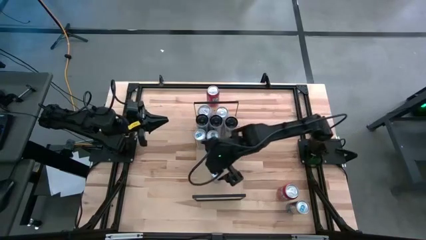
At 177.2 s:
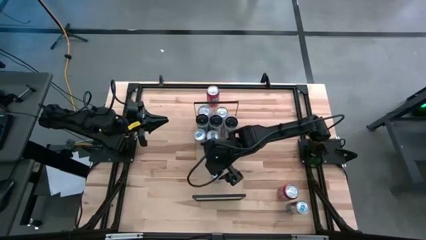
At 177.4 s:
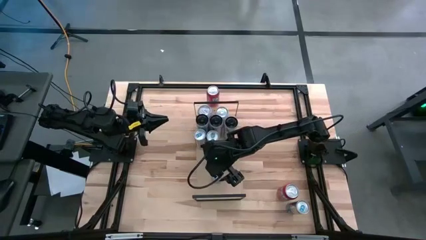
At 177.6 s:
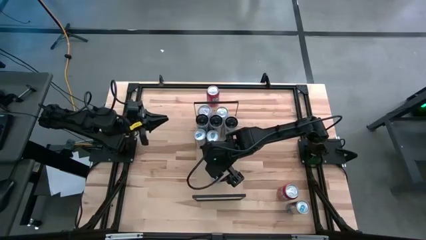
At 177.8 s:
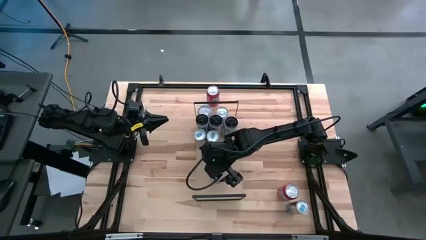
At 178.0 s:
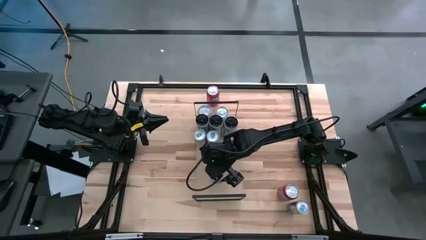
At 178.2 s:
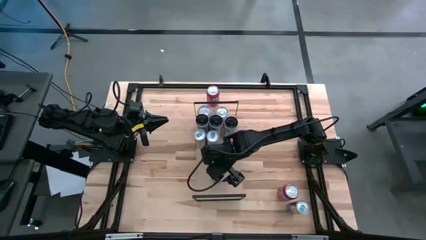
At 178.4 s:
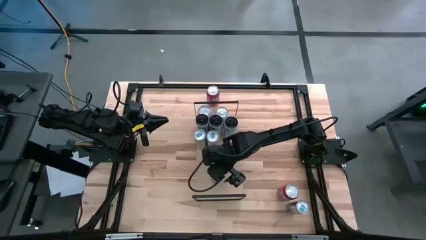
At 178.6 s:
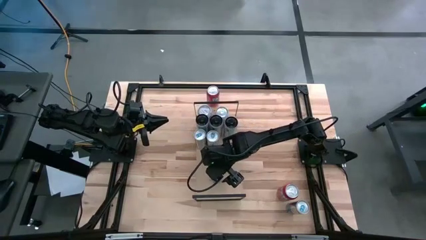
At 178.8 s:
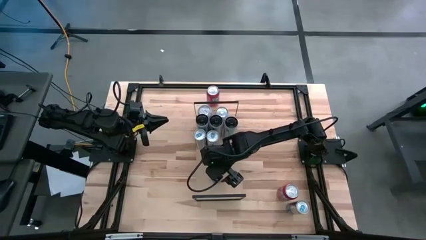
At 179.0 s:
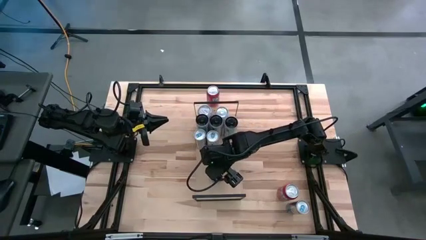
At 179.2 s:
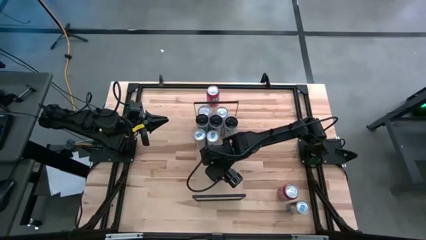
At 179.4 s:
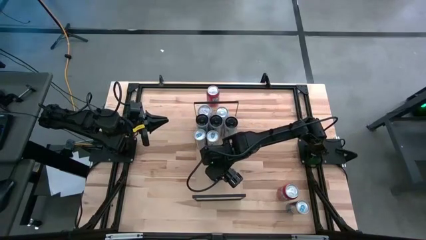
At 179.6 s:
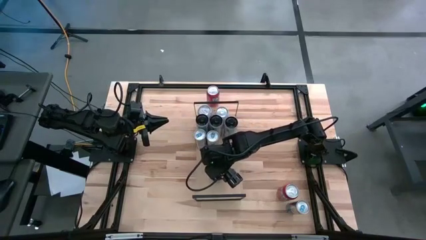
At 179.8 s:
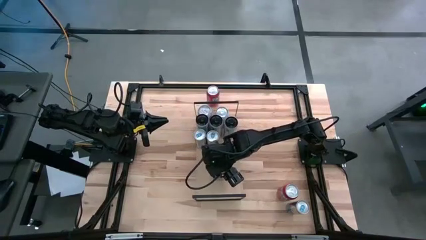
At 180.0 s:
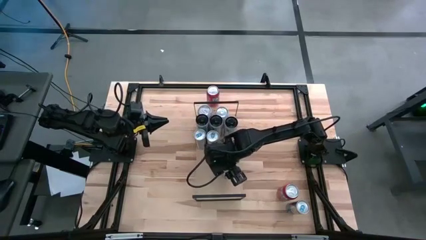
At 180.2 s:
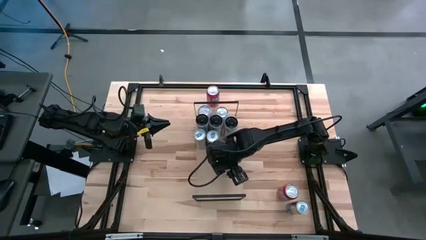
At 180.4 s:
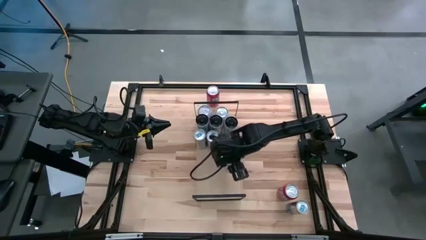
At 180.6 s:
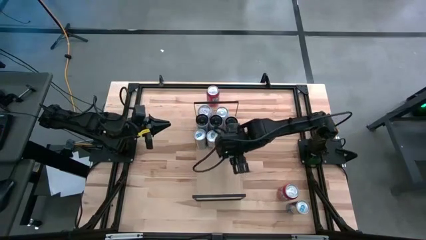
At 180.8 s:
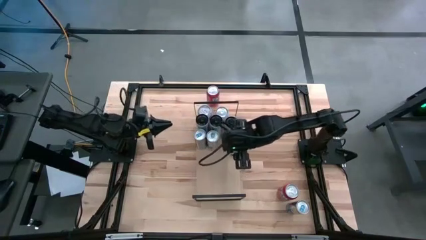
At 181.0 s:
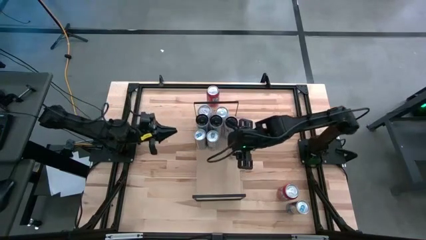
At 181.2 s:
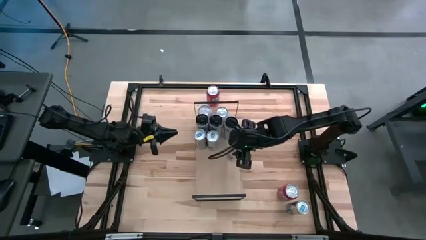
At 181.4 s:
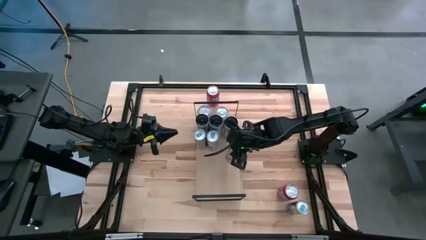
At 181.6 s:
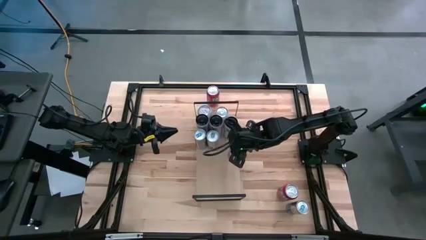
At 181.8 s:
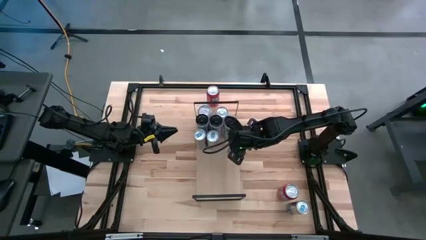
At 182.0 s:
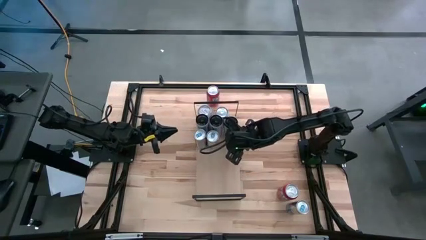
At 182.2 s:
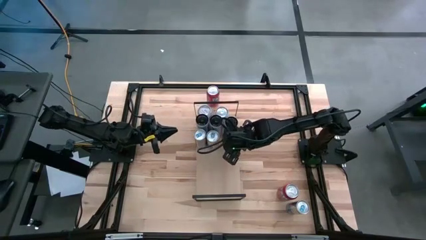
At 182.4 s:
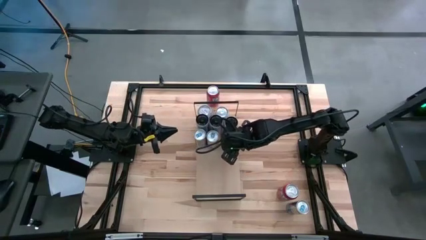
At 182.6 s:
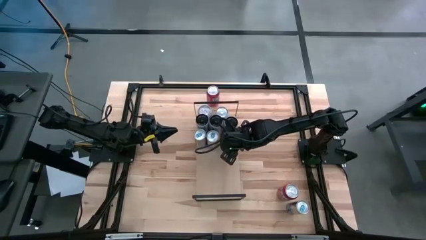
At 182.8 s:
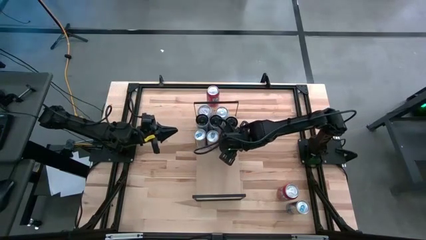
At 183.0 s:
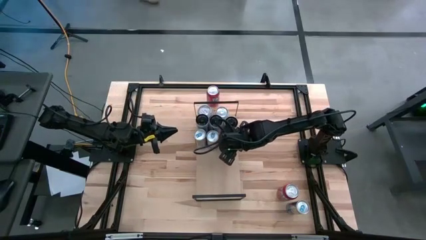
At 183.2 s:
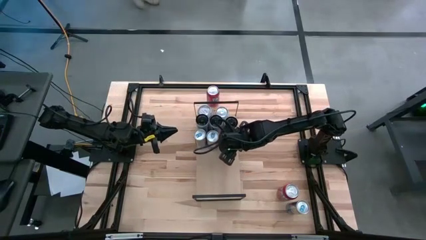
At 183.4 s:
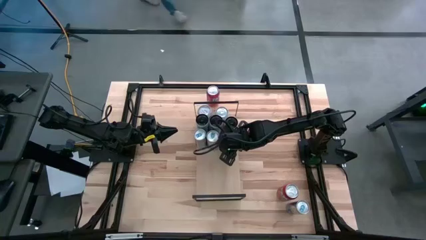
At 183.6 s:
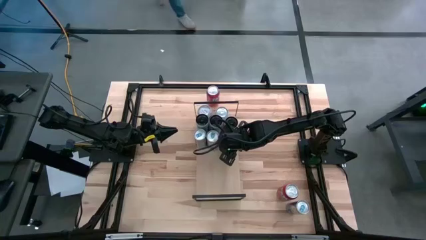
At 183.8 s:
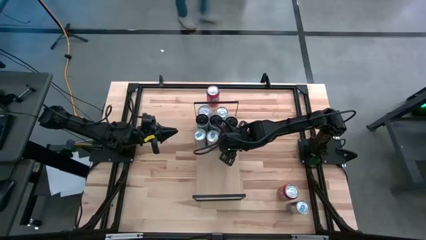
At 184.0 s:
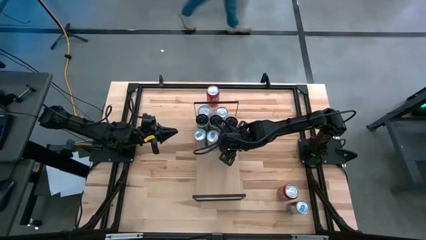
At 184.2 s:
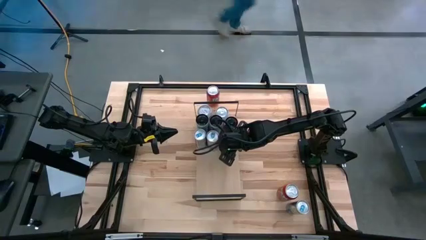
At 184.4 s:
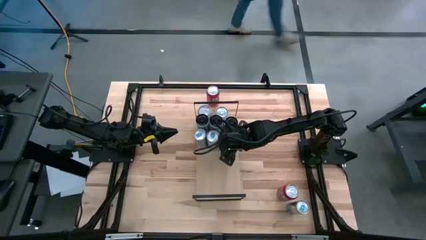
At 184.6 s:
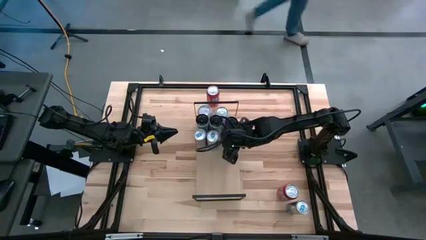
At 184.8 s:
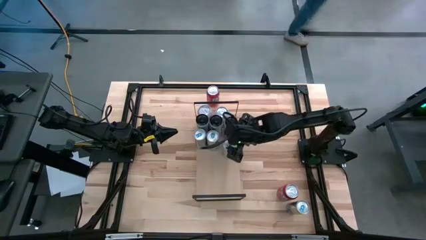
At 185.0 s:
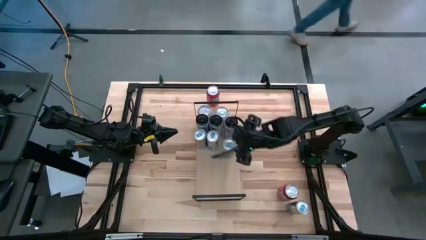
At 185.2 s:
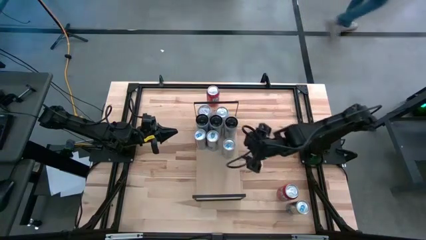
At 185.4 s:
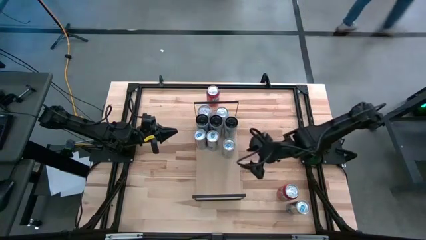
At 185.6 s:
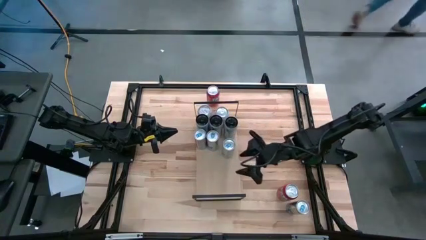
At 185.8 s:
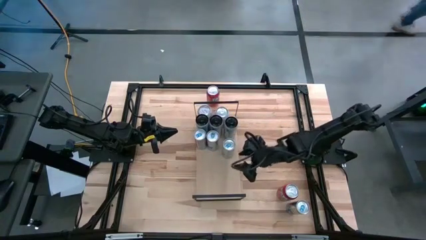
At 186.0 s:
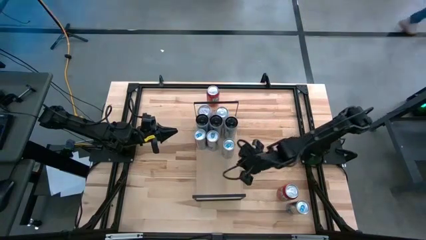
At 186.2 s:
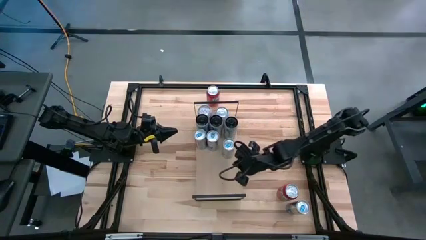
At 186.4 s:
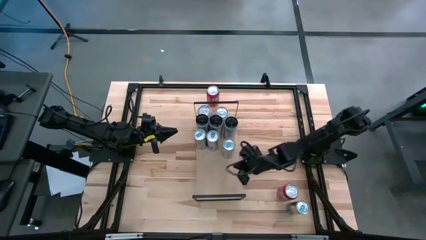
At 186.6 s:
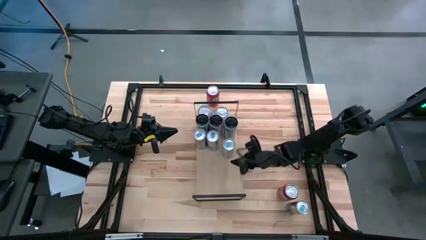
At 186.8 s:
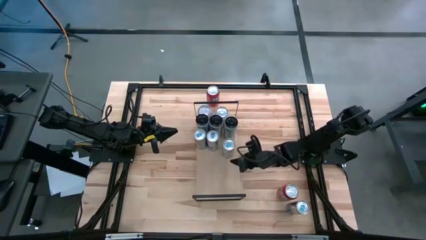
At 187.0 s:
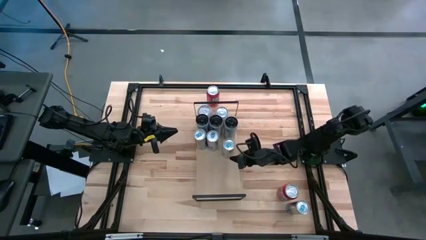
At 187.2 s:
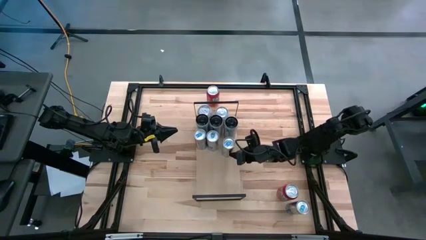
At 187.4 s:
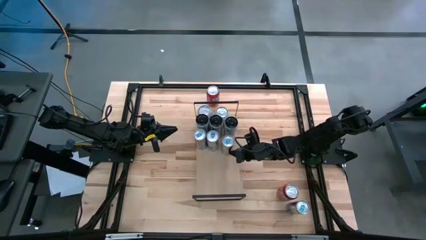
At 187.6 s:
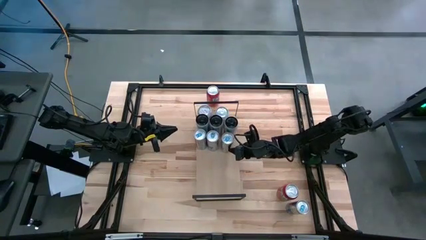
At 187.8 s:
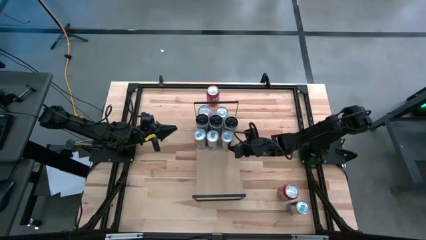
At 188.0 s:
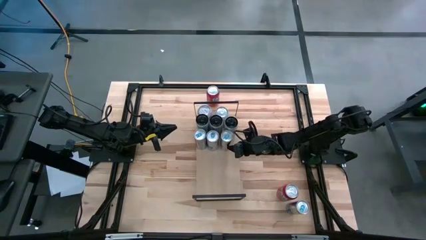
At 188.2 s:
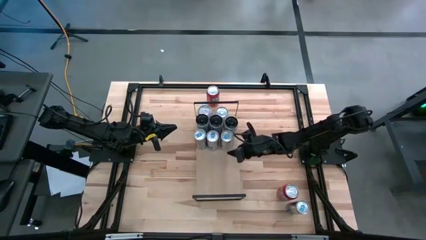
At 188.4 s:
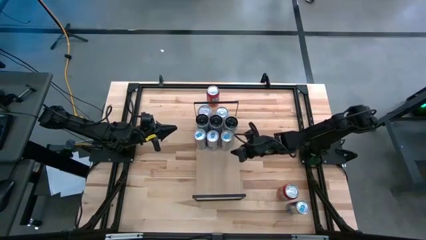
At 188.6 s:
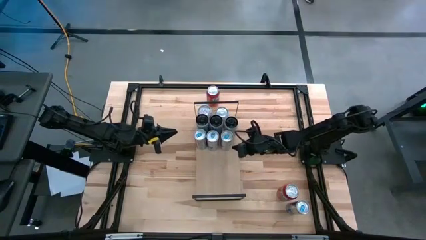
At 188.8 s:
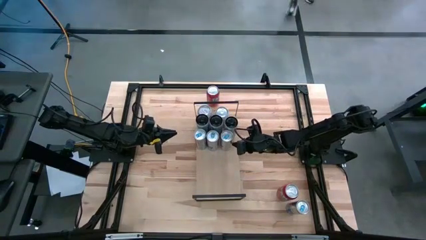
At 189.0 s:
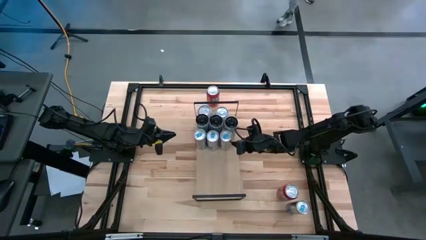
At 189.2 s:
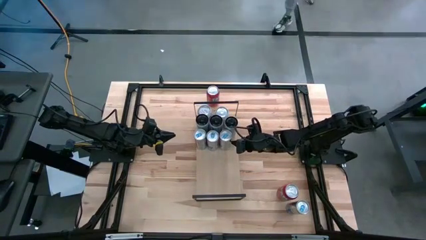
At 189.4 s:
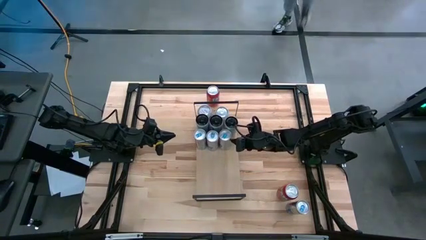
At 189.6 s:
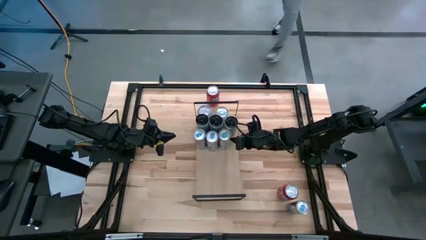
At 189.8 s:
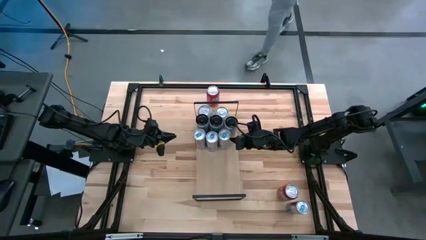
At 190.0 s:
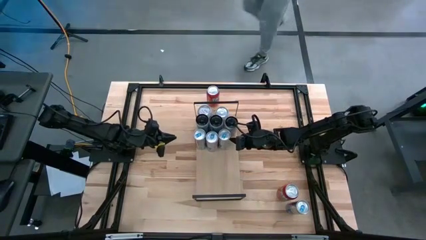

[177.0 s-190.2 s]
Task: Place canned beverage on shelf
Put the top blue soda can on the shelf aligned with the other blue soda can

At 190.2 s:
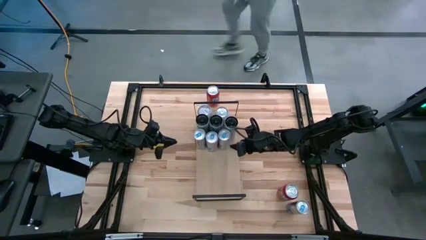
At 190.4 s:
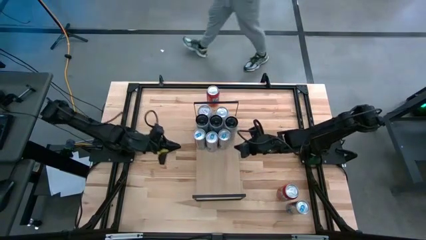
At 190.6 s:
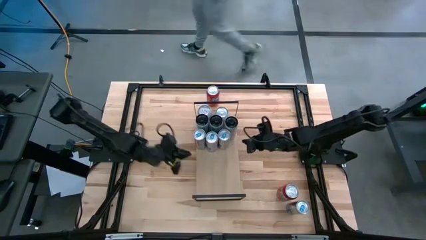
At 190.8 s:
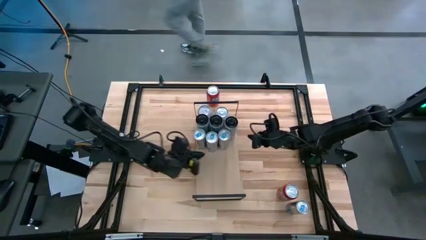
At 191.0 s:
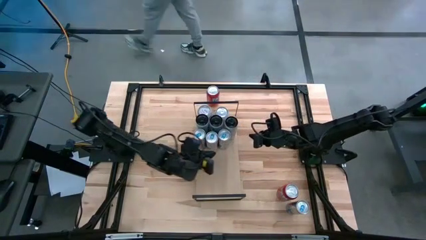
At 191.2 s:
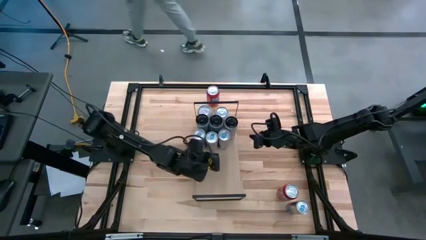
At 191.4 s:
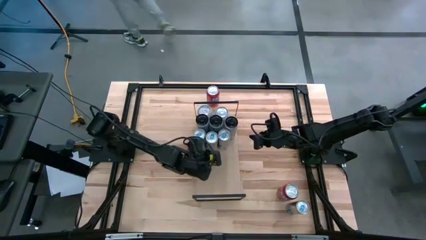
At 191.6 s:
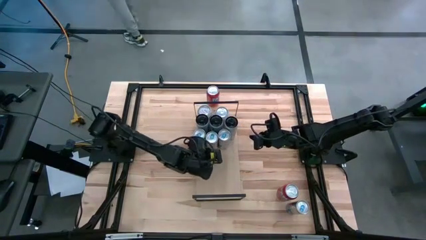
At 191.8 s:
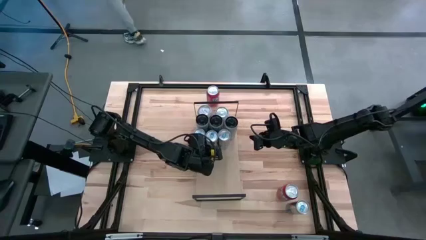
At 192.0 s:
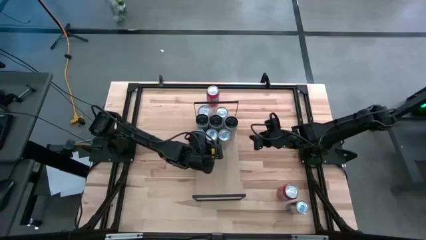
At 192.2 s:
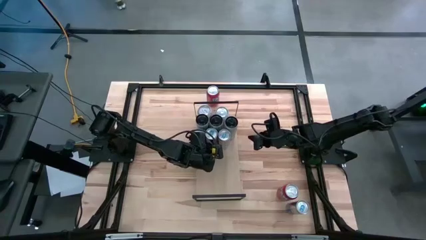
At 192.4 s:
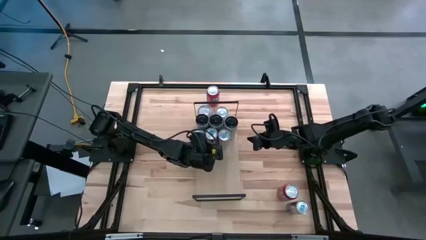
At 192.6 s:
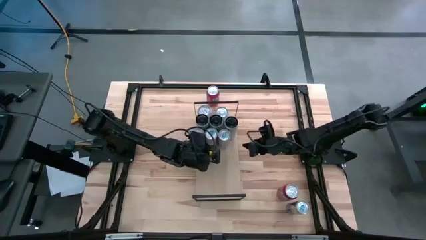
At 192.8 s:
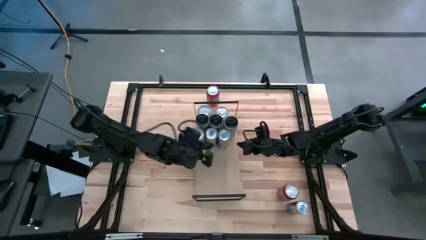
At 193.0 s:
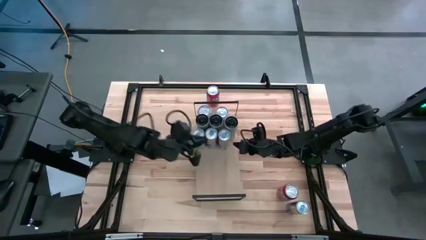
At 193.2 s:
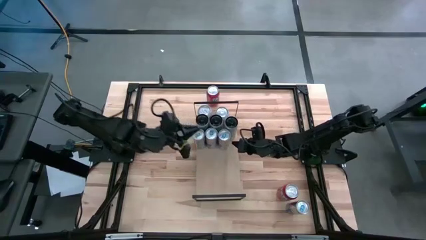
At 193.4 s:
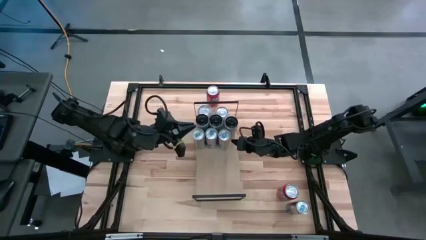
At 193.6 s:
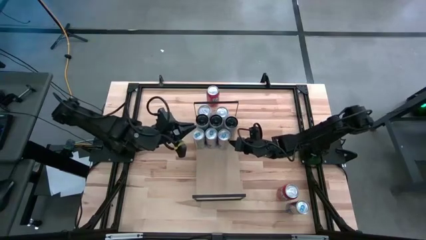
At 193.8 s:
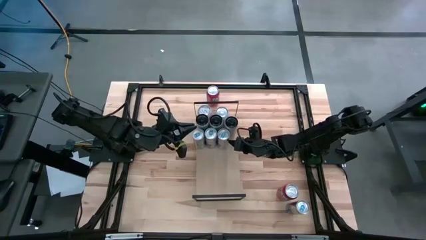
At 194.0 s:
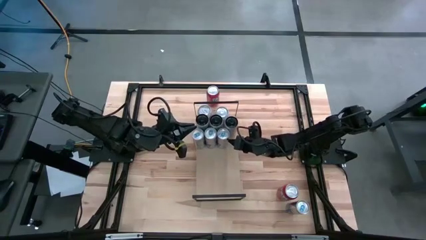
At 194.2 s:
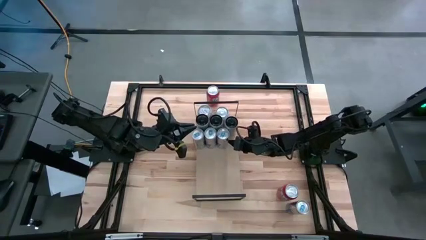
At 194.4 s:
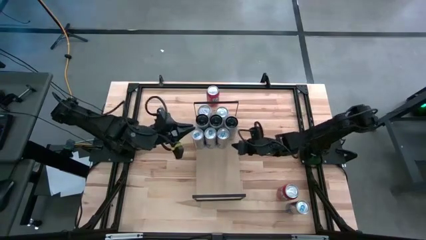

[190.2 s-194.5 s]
Adjust the blue soda can on the shelf
